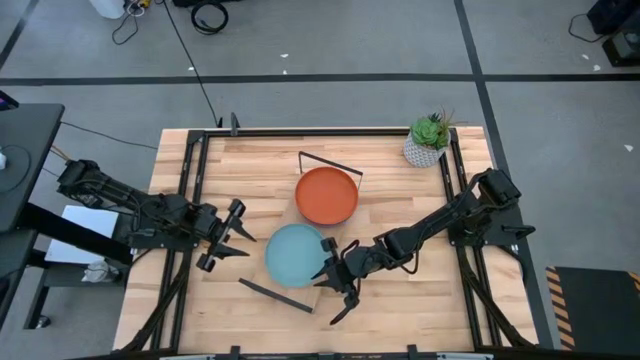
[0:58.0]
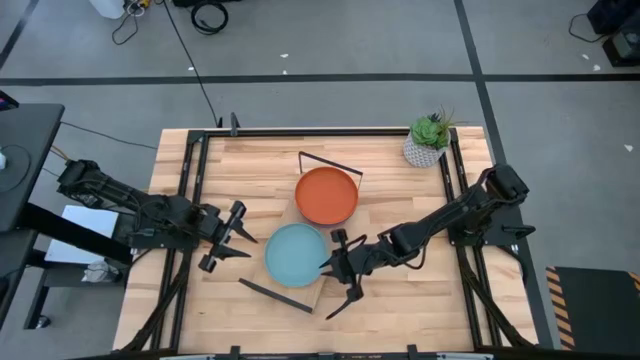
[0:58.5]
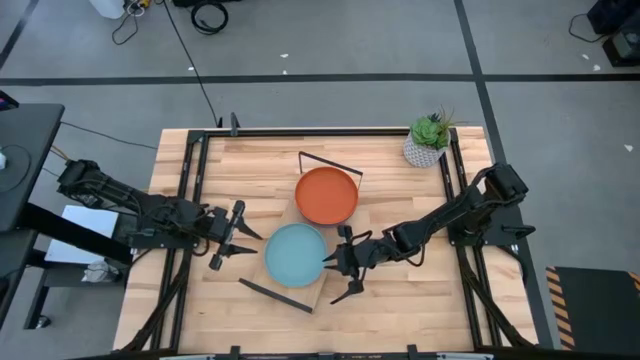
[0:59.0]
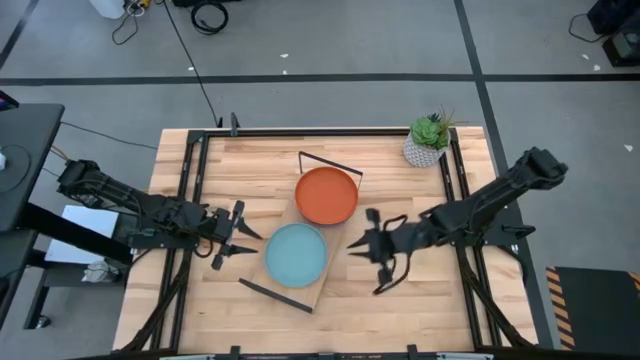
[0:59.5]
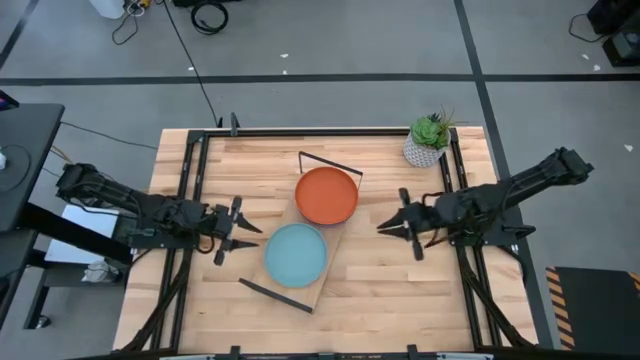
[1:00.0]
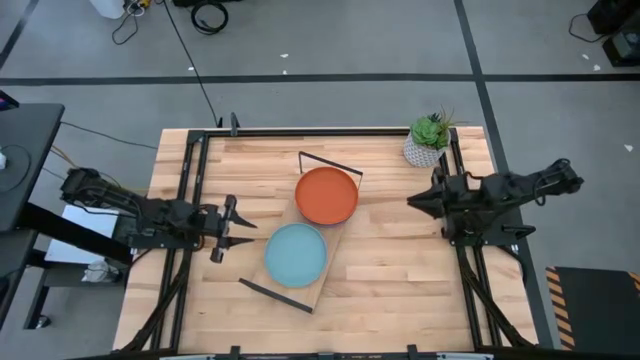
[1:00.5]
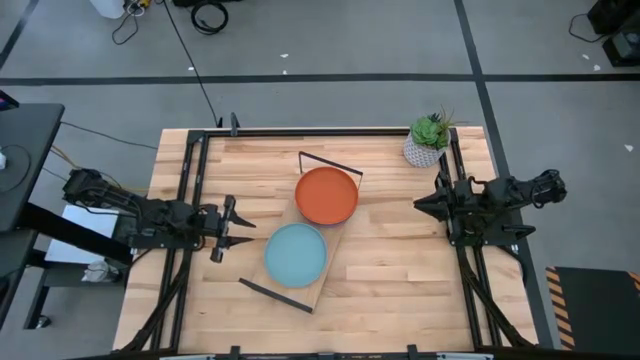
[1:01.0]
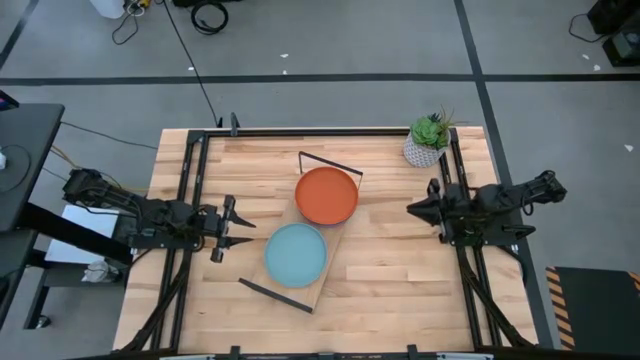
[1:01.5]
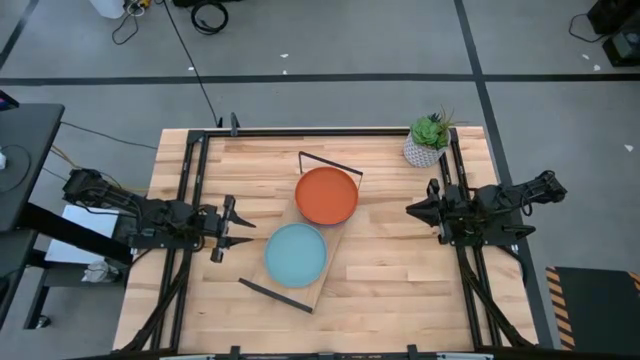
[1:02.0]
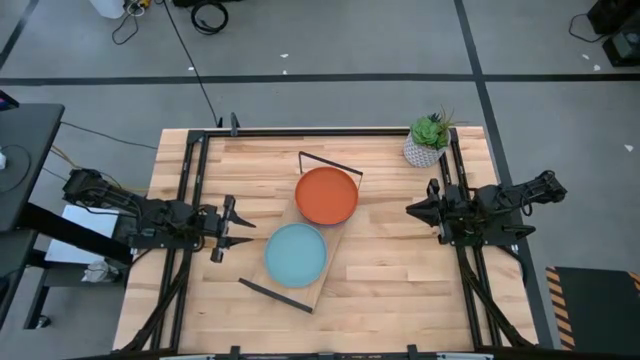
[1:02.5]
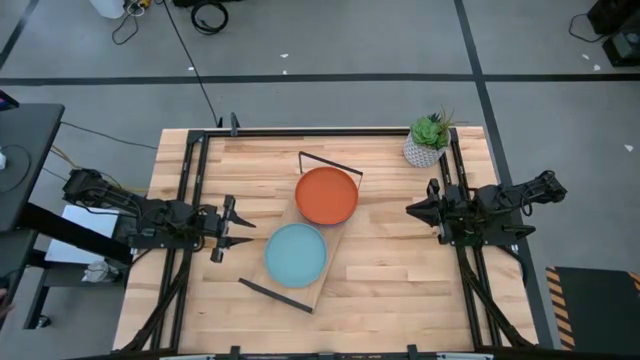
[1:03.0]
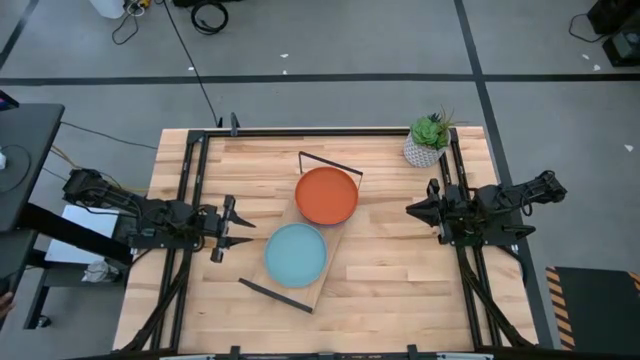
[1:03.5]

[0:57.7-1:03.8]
Task: Place and stack plates onto a shelf
Return to Home Position

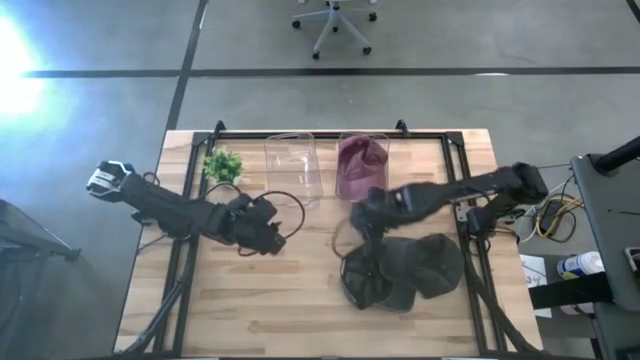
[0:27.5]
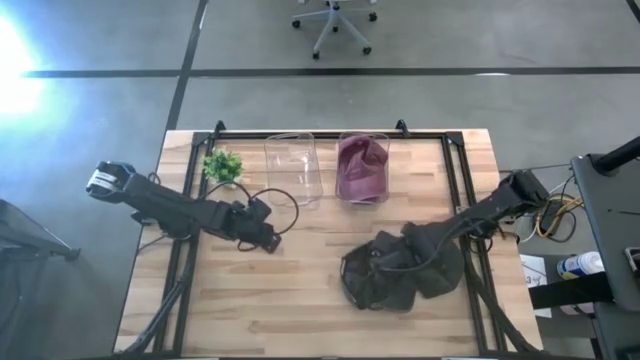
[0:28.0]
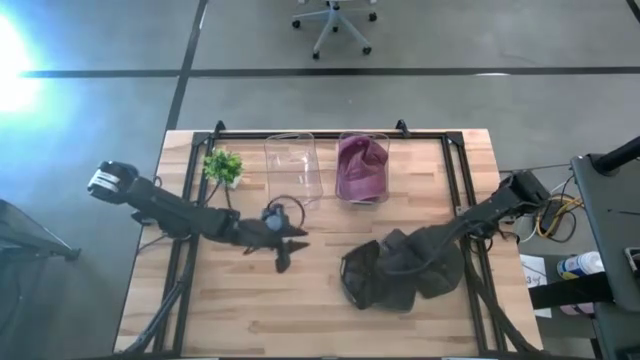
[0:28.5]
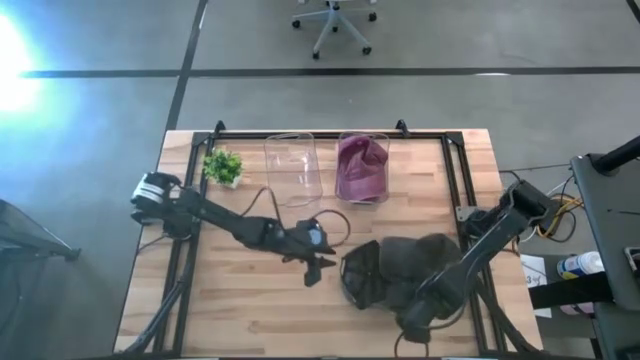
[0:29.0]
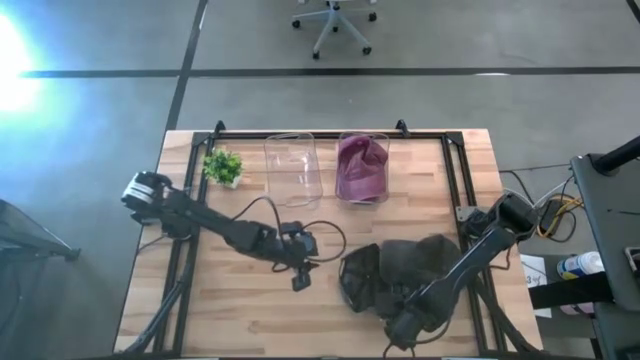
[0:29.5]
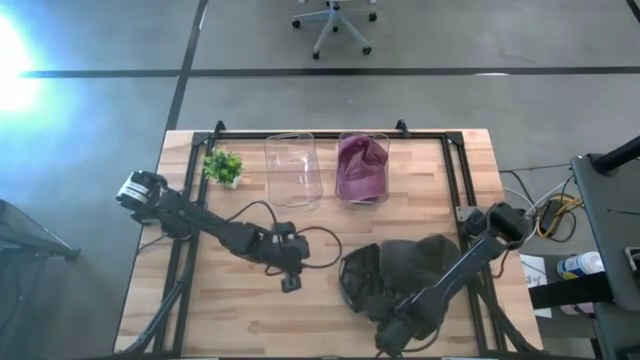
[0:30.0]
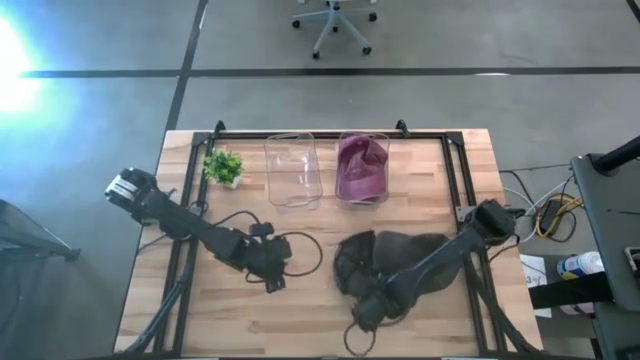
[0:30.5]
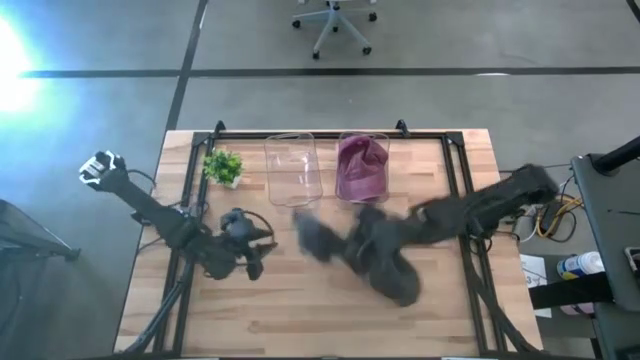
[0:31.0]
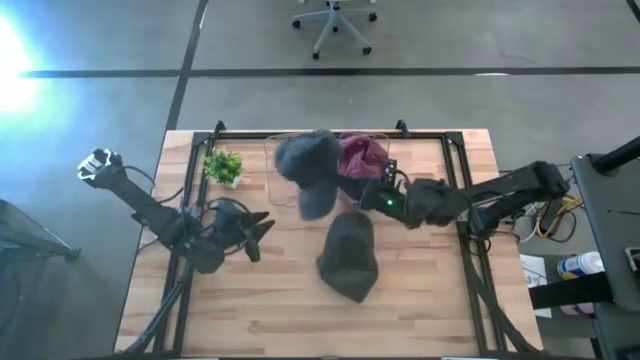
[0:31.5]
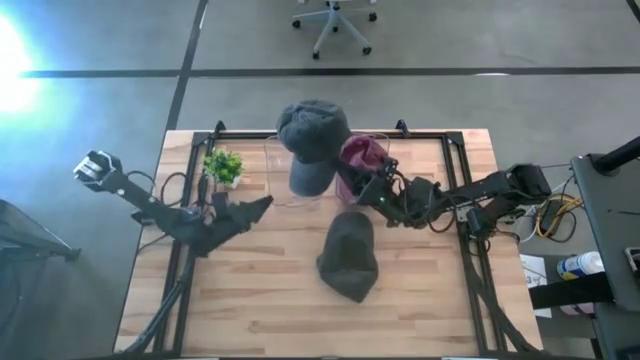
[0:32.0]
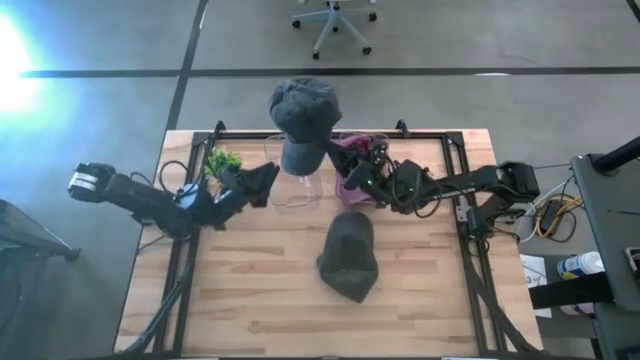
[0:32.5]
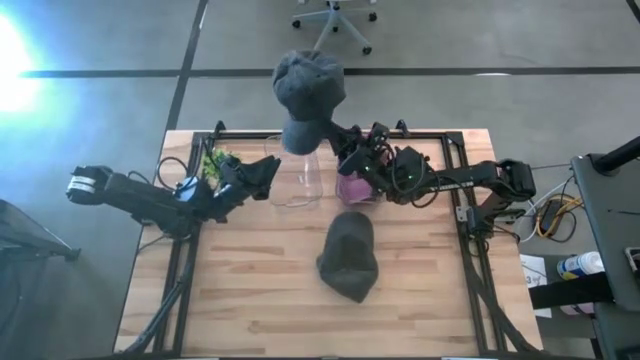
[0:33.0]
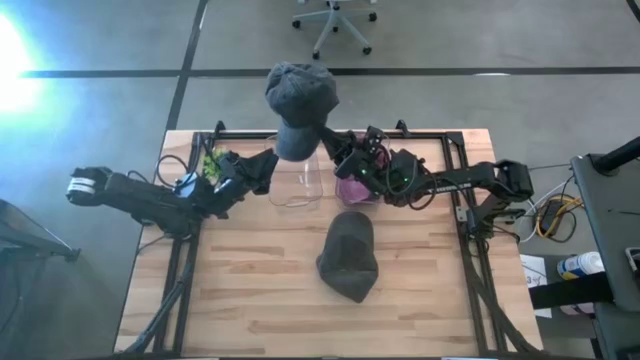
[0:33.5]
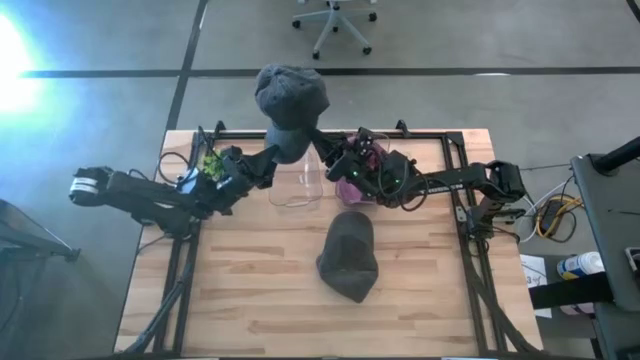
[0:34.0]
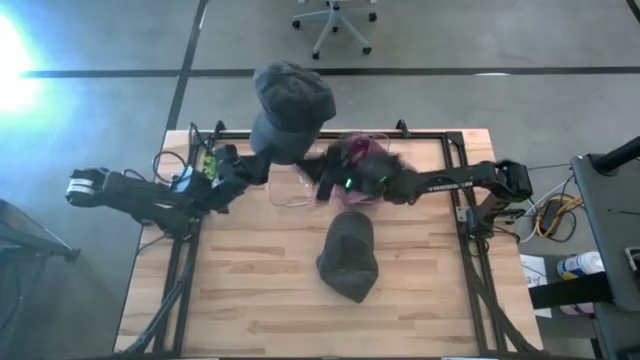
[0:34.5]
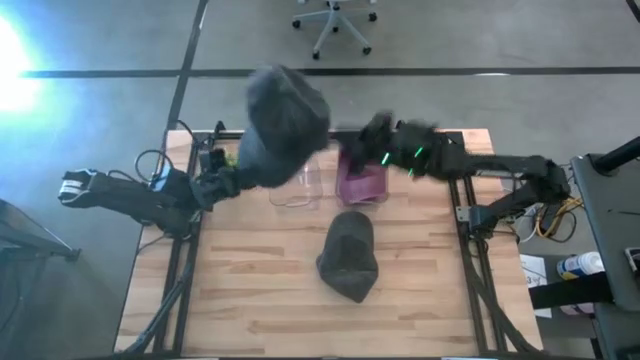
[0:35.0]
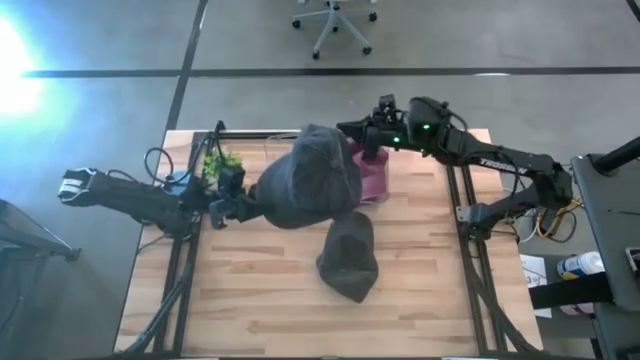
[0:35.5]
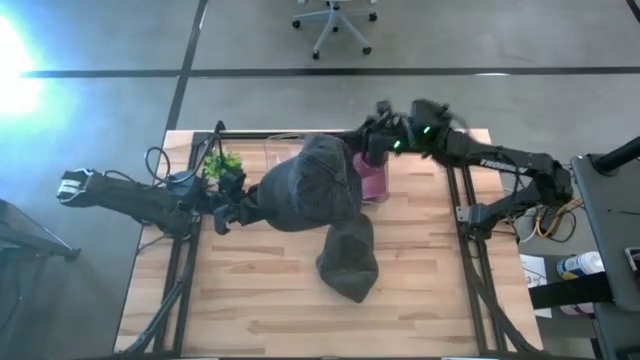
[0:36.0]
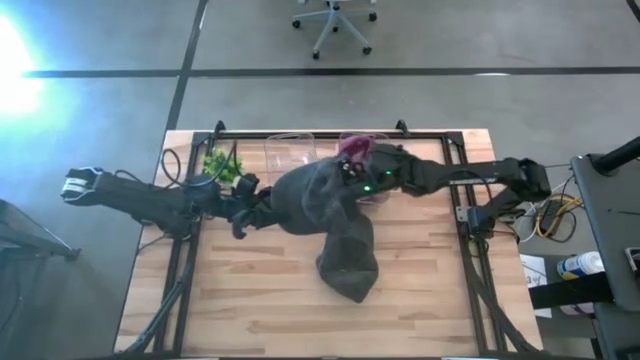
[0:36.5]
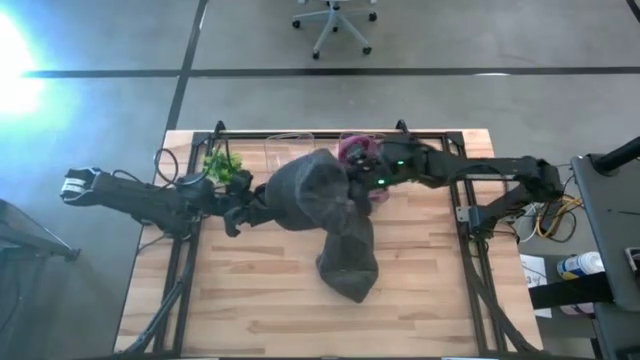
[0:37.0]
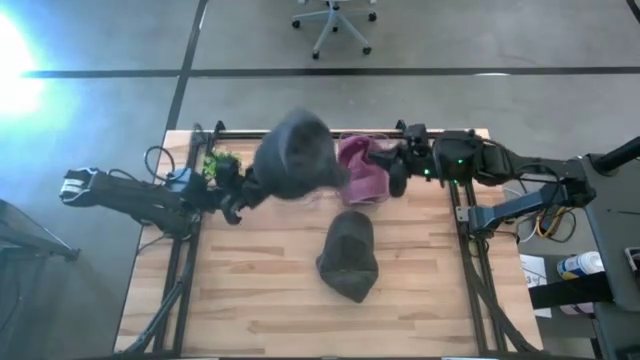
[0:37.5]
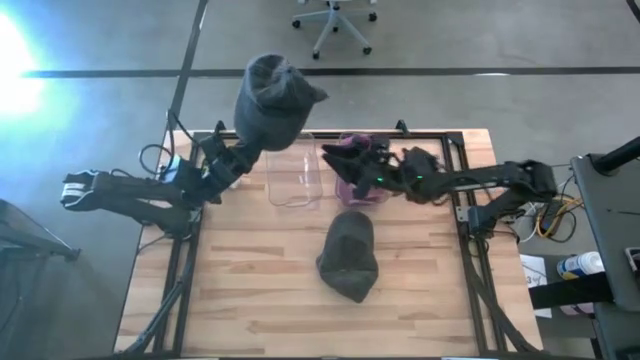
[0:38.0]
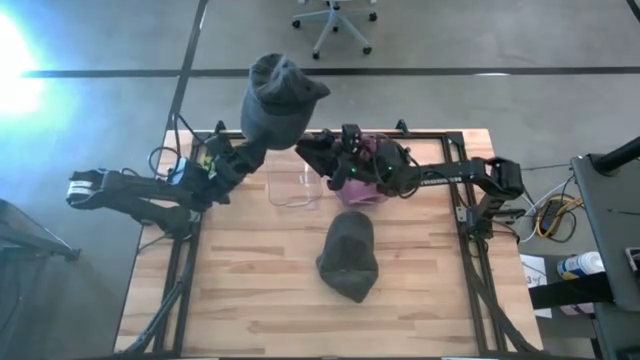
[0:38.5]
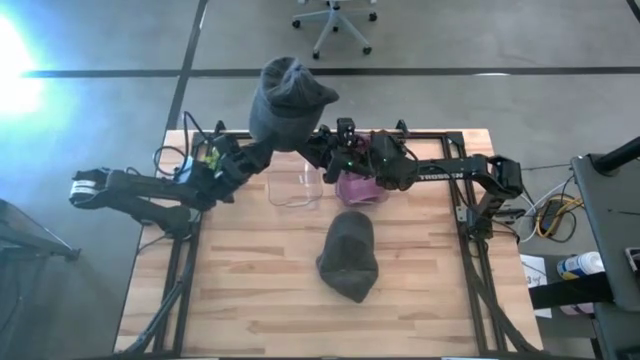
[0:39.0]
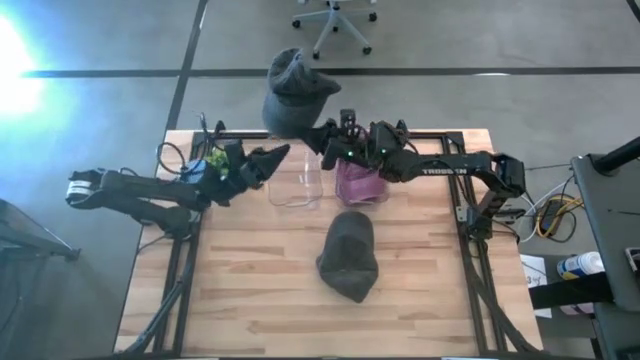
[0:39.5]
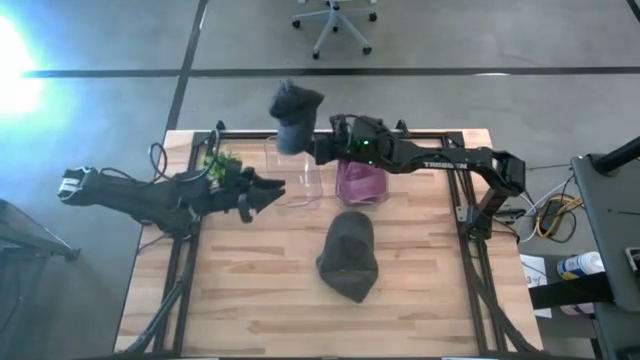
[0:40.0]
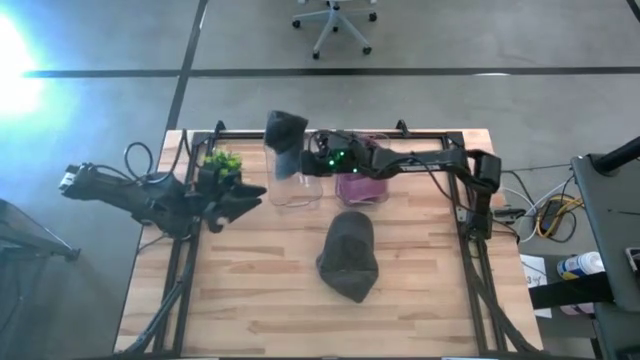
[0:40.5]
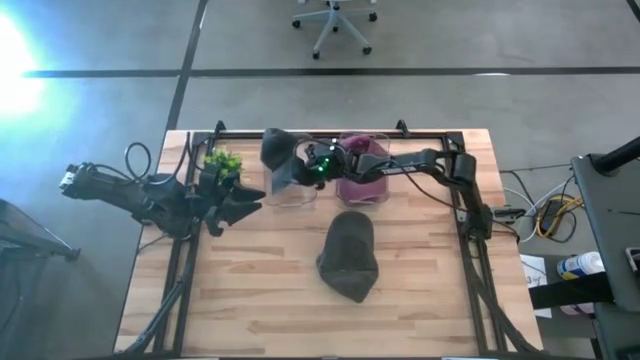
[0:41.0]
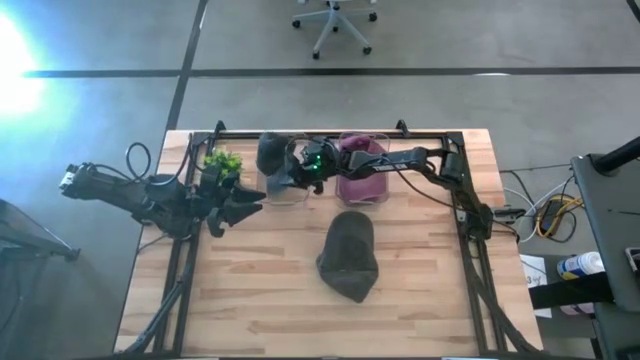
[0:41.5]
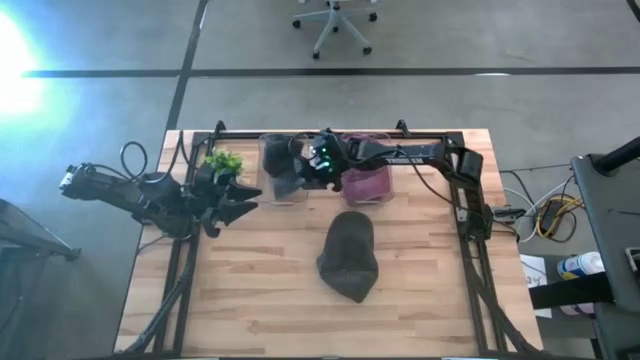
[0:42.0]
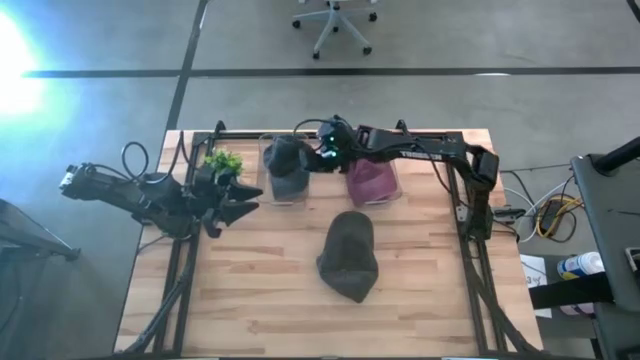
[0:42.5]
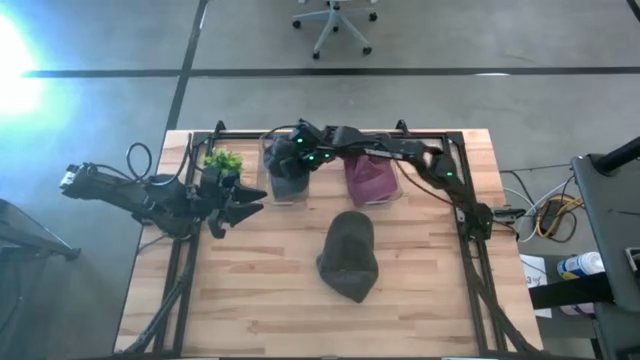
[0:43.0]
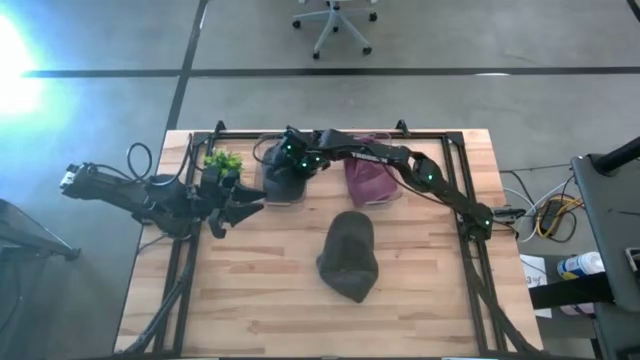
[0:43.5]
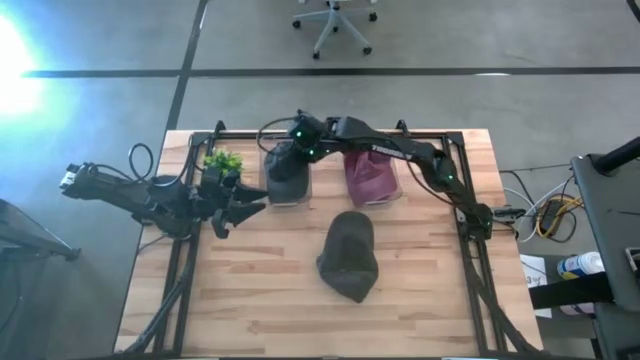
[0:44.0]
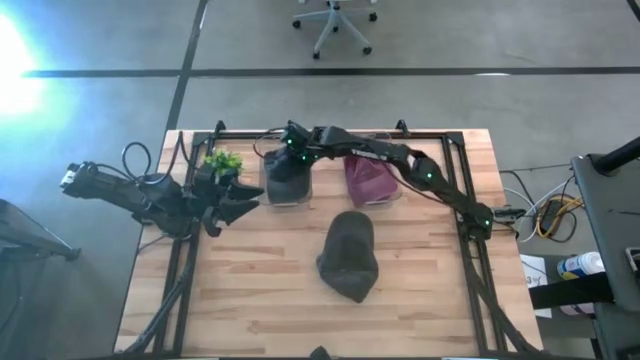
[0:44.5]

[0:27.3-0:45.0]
Task: Pick & Place hat
Put the left black cap into the left transparent bin
